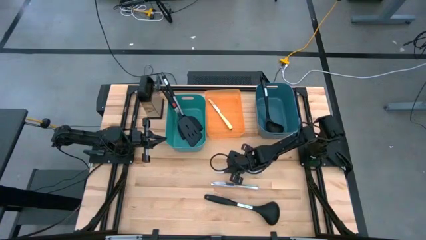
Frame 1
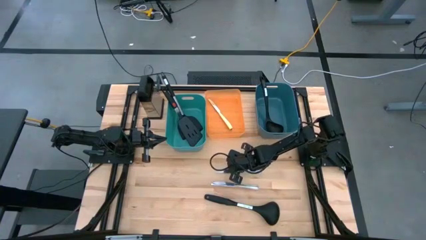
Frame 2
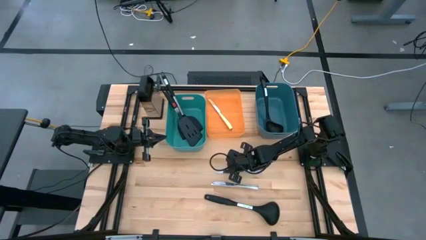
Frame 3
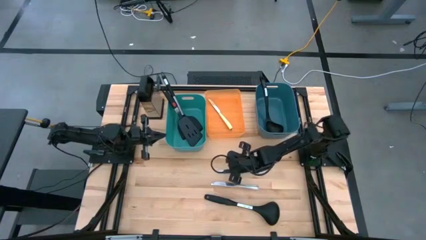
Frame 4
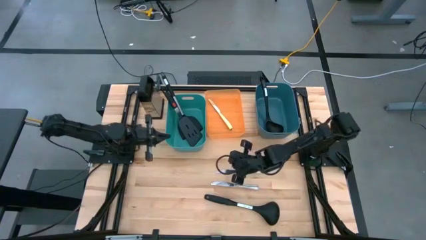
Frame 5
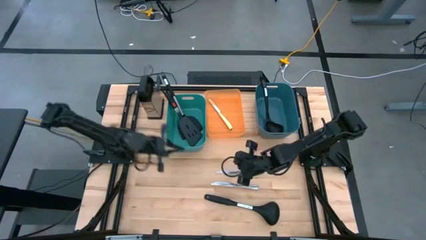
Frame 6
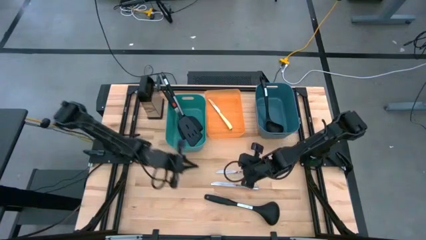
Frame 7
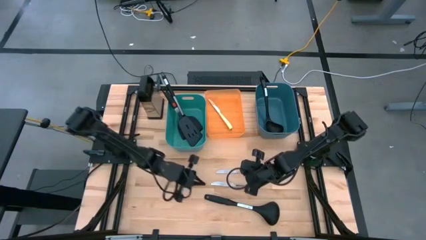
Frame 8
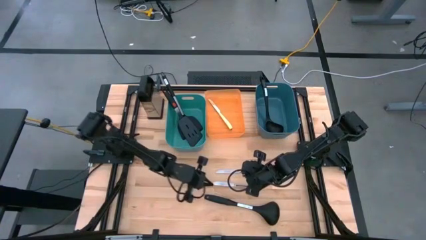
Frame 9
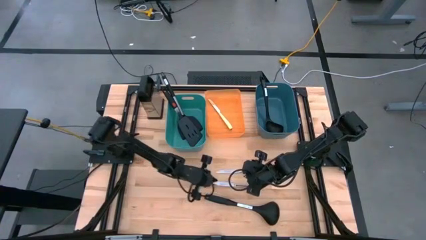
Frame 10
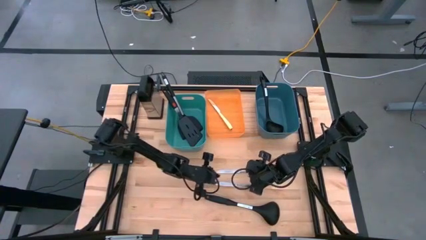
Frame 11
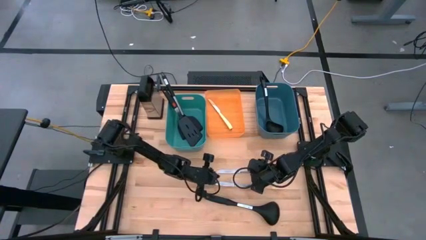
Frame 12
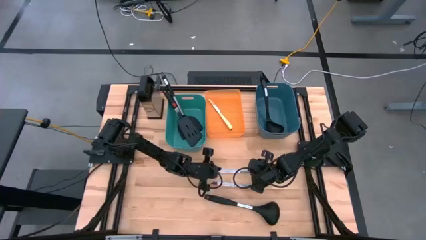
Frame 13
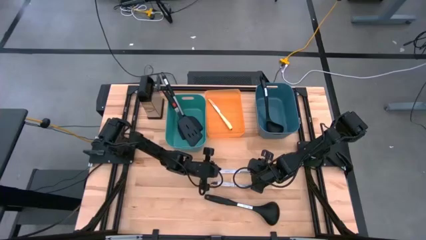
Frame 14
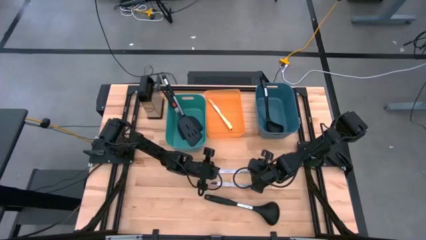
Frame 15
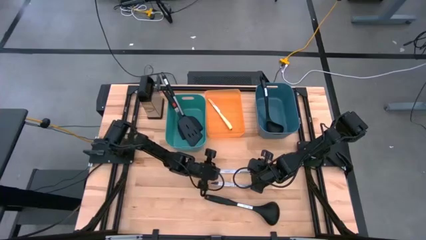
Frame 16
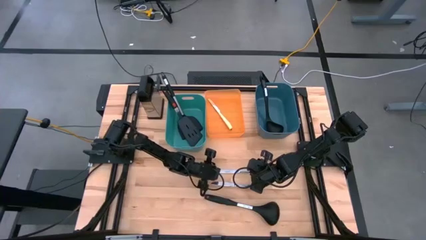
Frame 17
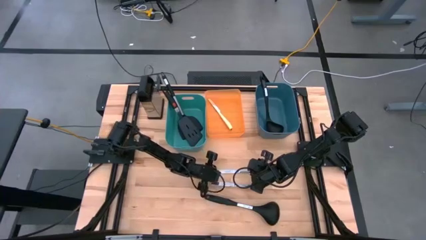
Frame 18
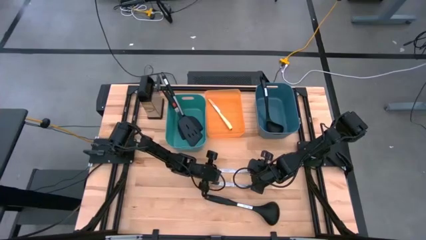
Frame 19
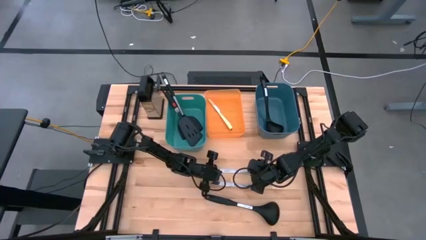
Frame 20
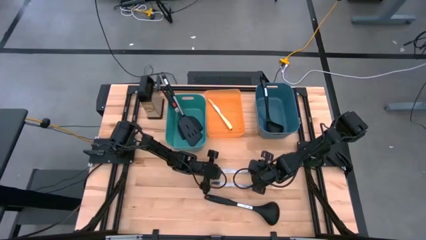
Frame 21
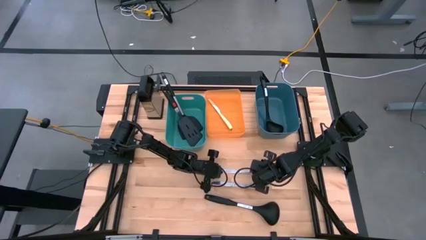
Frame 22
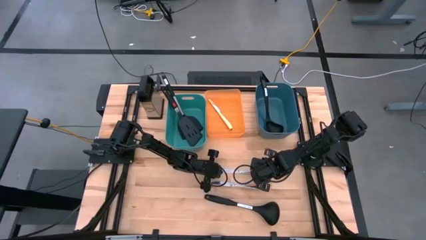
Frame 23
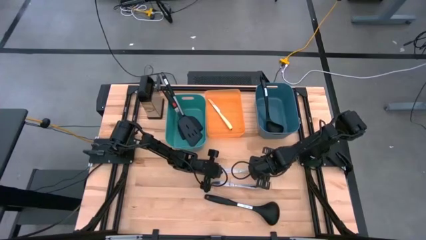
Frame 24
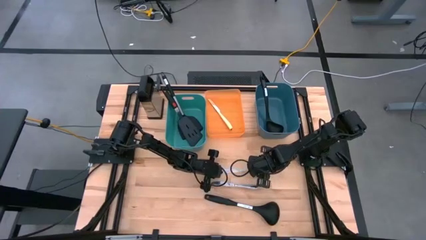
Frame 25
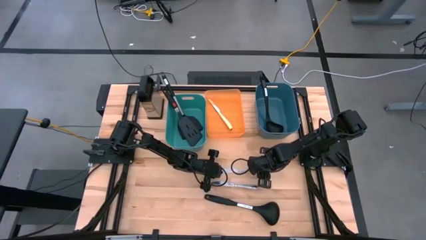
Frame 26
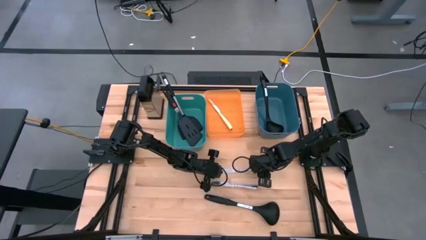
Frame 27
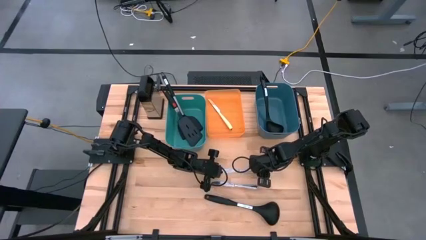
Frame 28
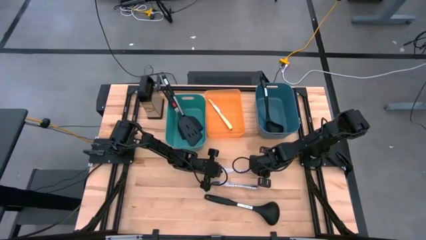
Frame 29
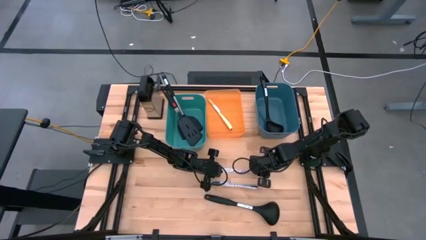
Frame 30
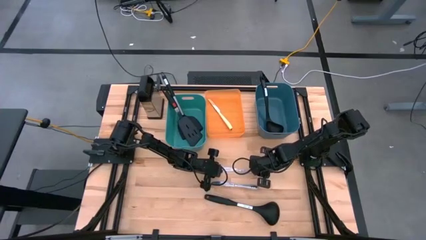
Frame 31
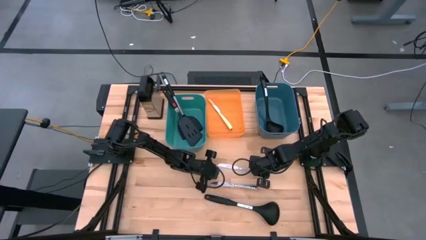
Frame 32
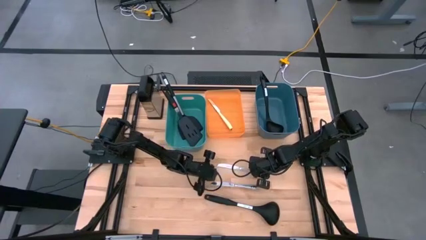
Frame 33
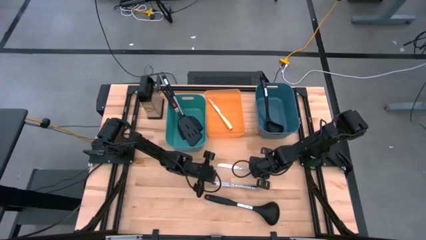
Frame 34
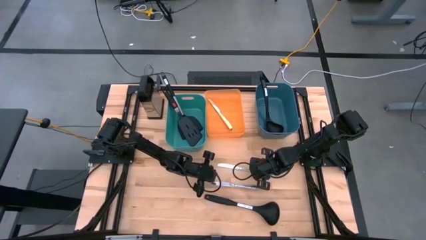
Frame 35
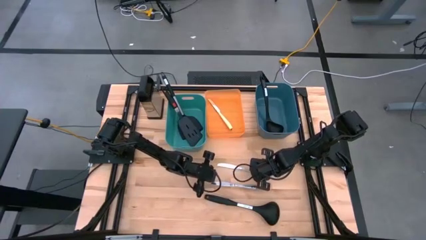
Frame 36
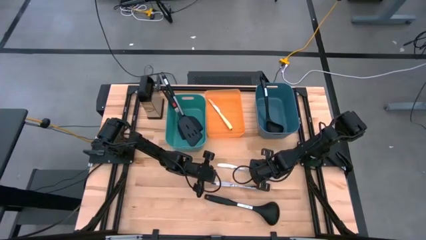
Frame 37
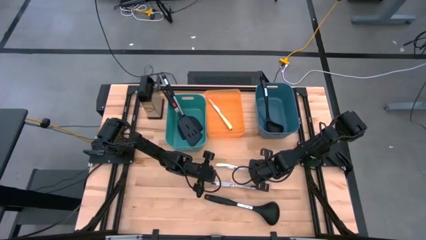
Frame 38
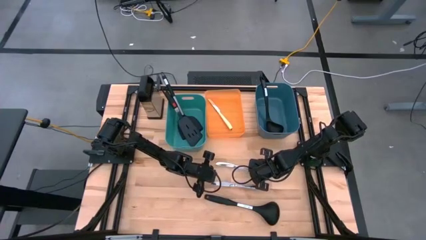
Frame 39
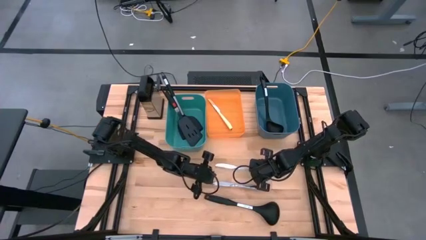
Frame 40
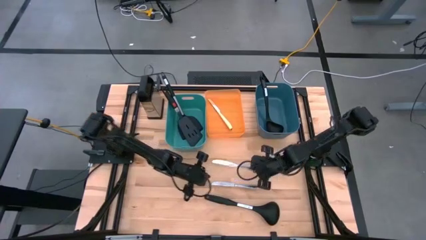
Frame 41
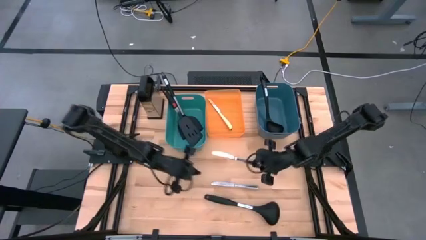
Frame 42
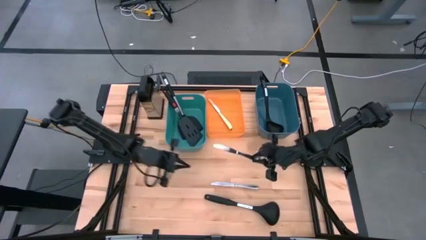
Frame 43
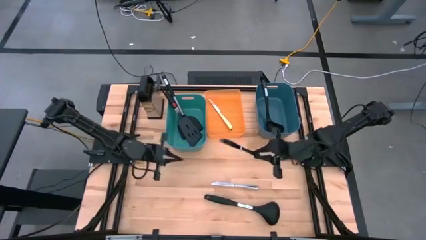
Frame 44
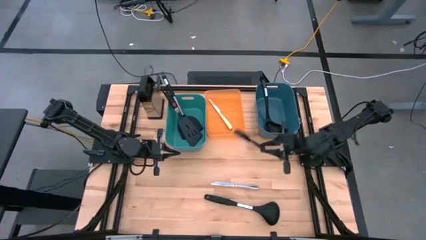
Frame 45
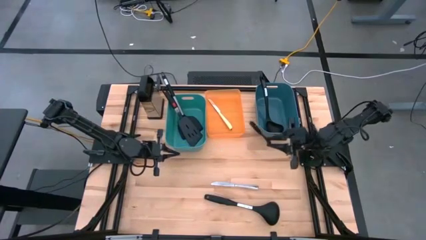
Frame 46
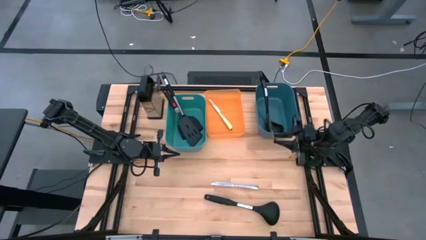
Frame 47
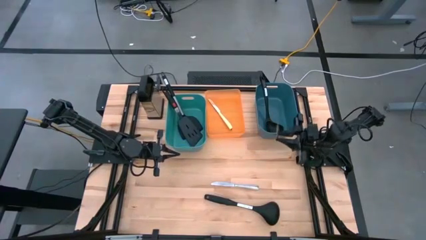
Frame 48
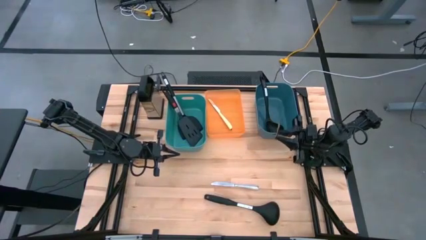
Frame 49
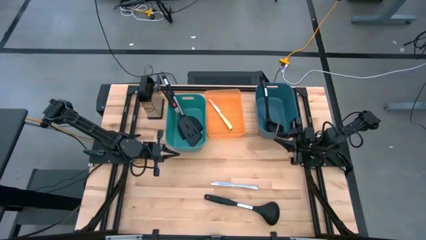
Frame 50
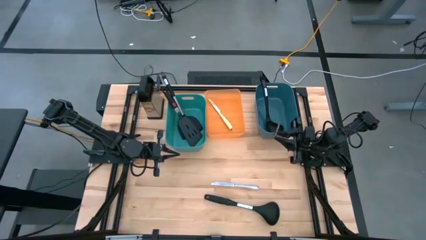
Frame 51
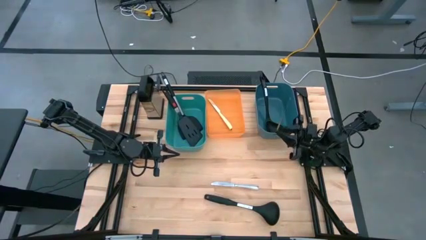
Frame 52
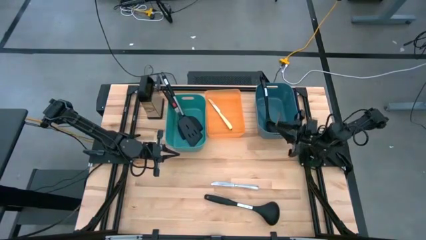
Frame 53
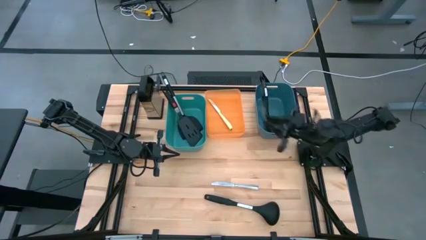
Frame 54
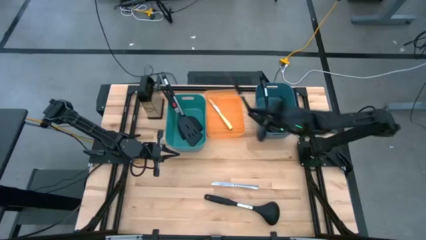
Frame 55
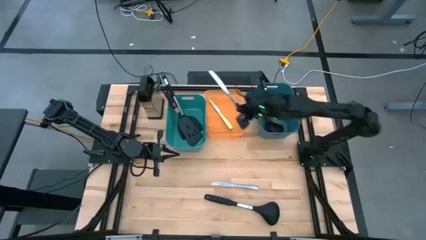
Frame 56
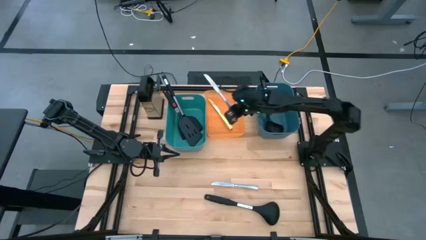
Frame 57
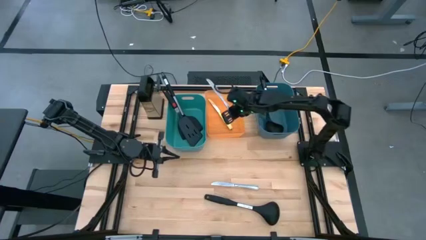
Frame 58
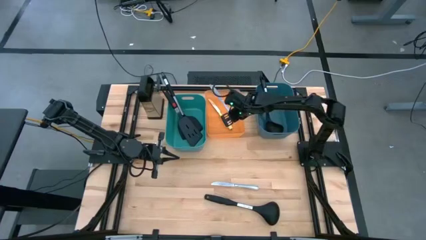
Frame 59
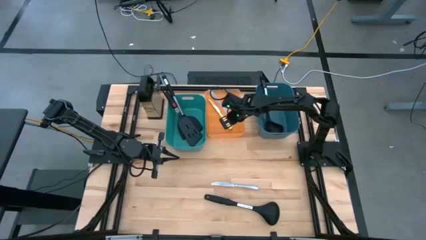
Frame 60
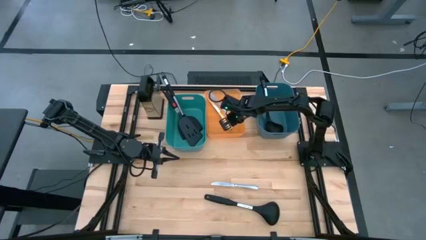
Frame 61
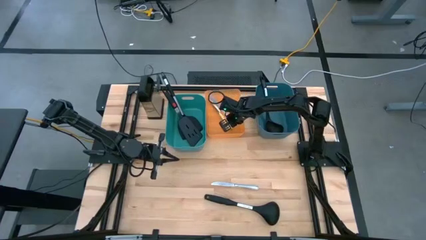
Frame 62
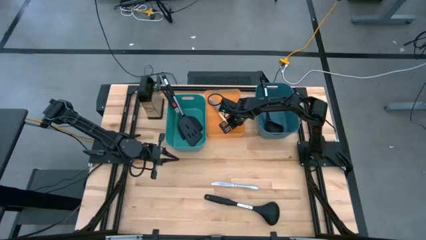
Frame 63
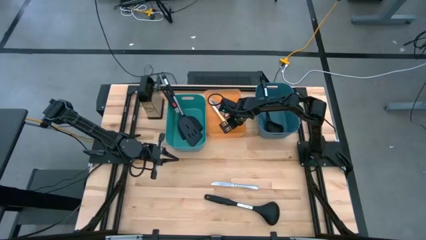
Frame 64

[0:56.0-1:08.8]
Task: Pick & Place Kitchen Items
Put the top silver knife into the orange bin
